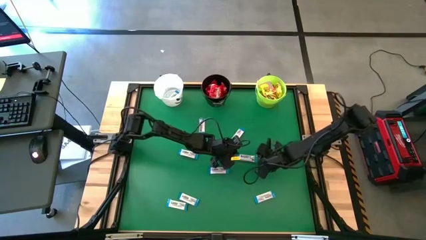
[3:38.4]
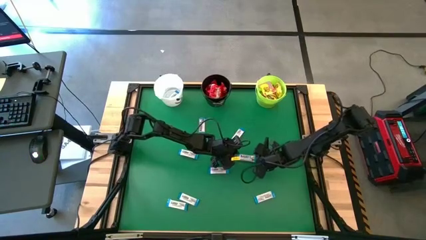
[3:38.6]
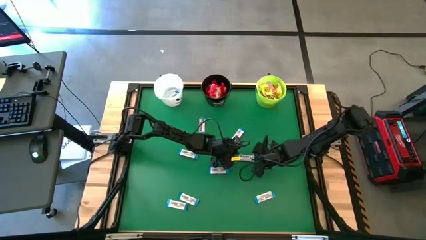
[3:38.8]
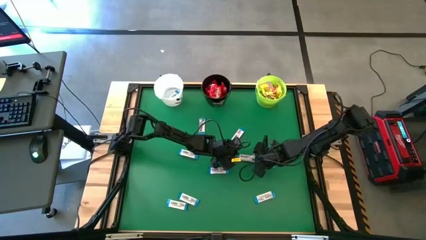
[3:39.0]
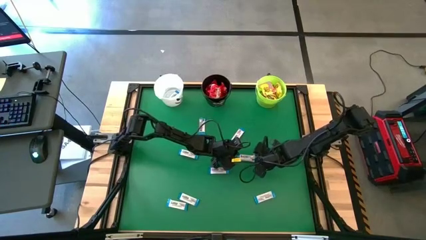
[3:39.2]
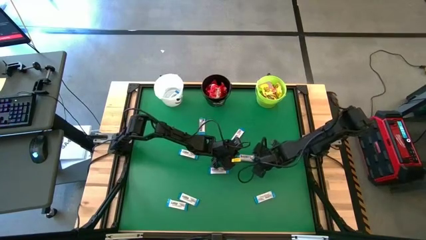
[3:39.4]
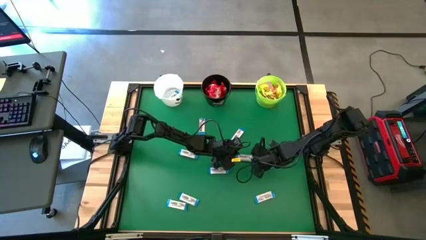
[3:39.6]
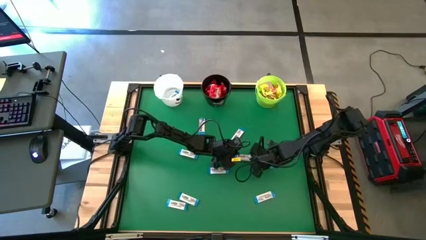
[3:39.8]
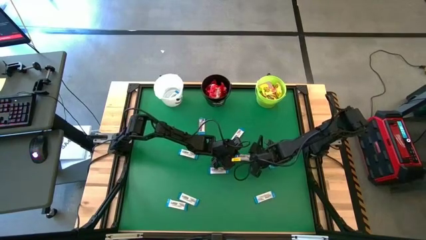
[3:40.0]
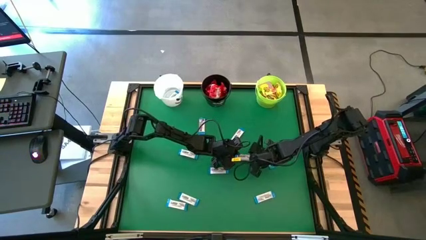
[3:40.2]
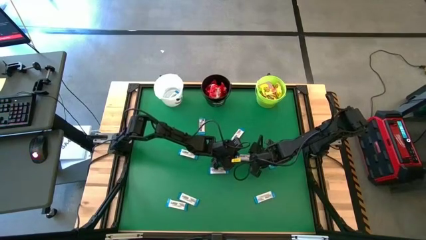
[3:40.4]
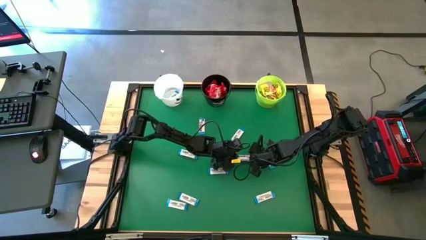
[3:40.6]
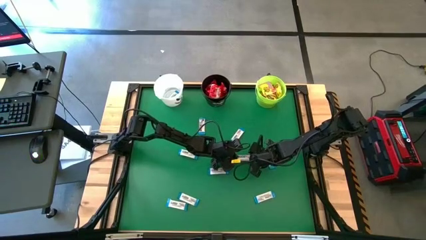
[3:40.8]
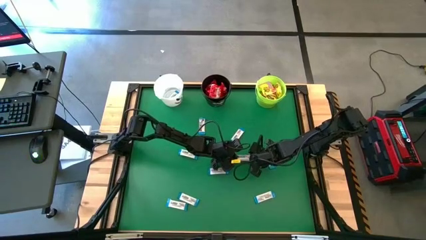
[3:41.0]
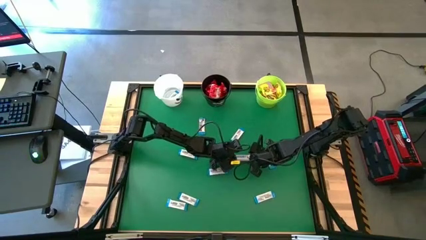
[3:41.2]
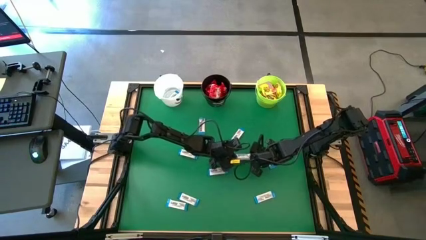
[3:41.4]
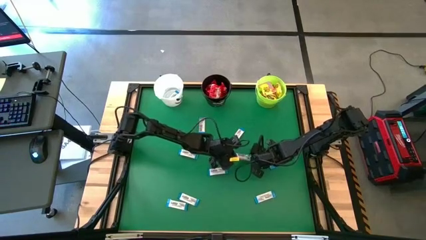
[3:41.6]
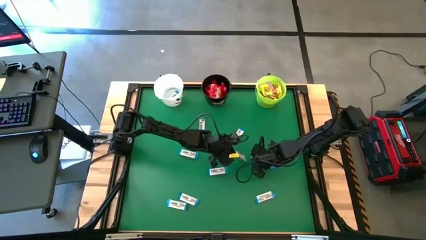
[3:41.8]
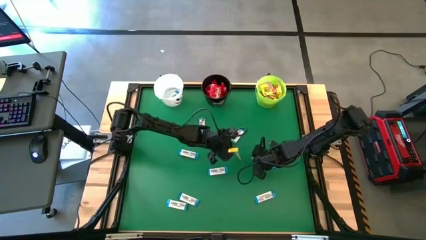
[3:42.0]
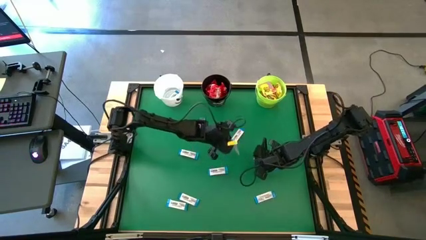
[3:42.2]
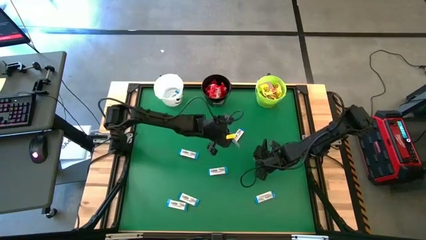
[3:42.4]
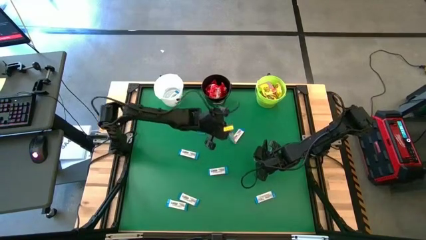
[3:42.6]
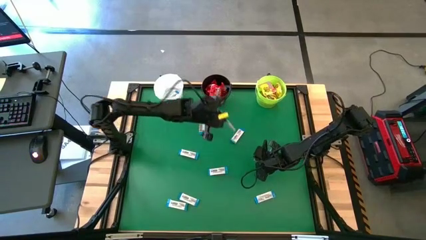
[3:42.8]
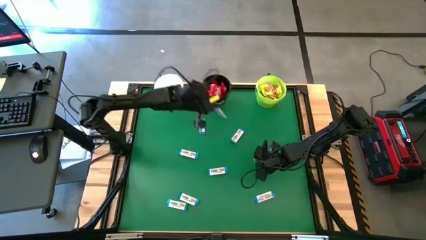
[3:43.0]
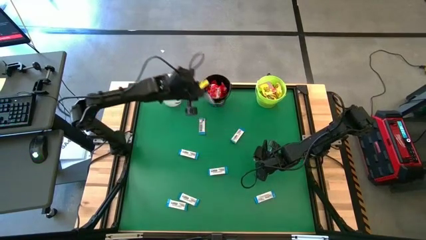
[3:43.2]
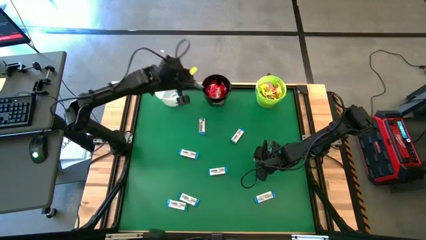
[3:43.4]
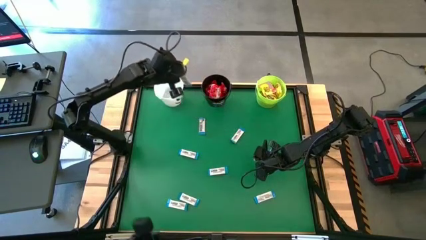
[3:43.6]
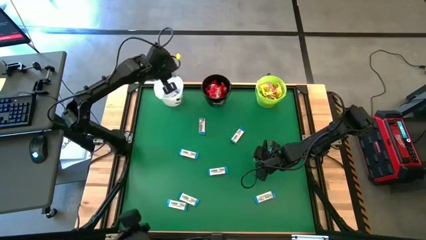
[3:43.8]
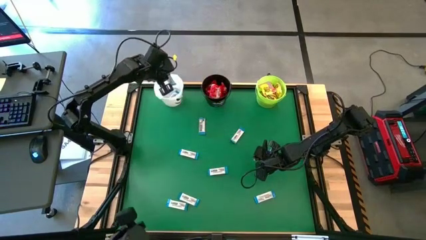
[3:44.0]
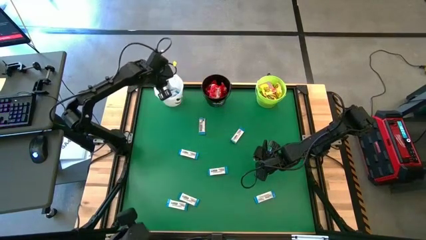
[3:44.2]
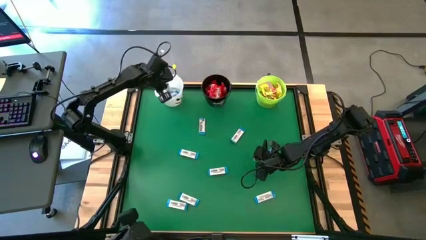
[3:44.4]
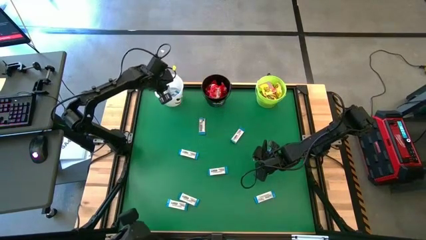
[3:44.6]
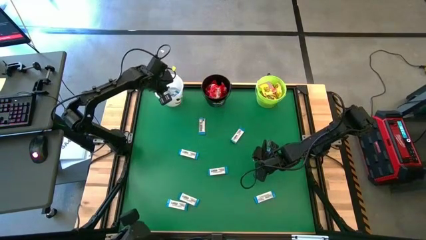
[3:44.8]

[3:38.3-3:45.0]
Task: Sort candy by brand, put in halloween buckets
Put the white chocolate bar into the white bucket

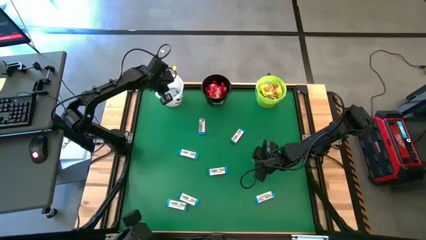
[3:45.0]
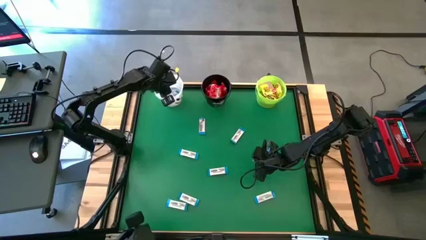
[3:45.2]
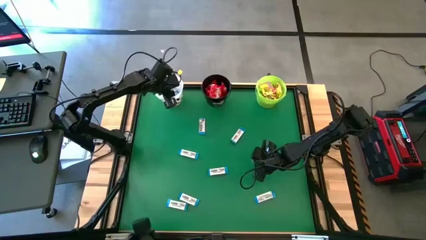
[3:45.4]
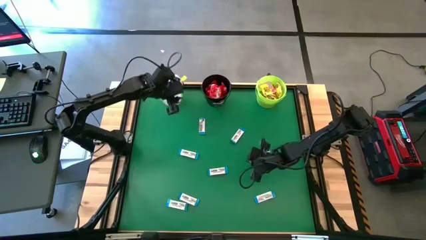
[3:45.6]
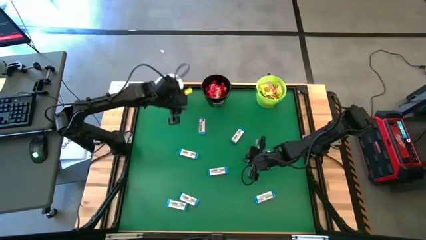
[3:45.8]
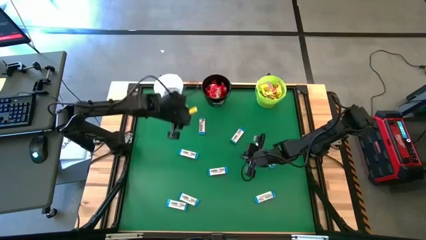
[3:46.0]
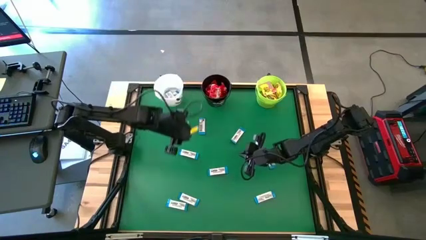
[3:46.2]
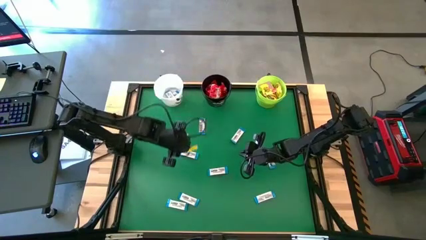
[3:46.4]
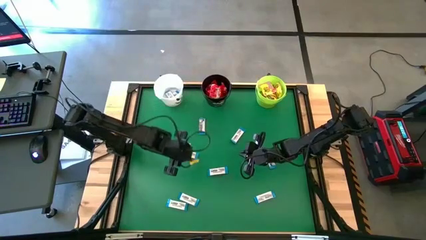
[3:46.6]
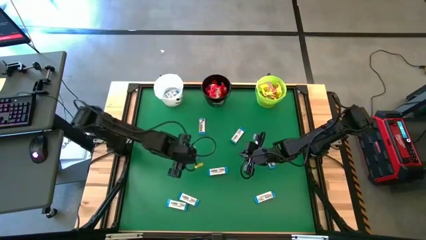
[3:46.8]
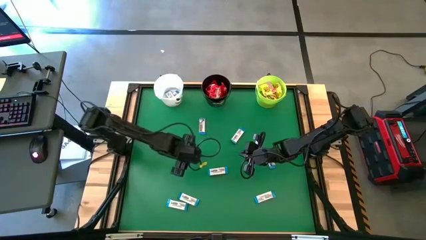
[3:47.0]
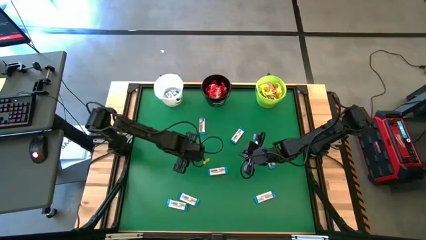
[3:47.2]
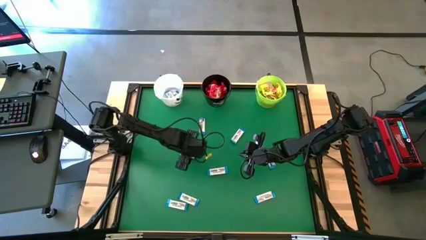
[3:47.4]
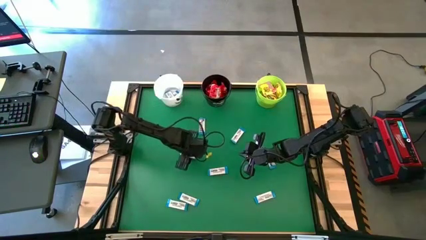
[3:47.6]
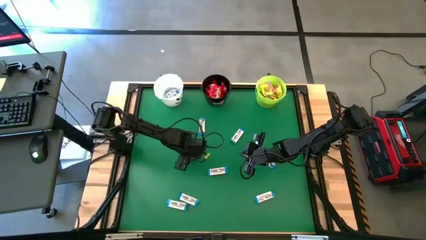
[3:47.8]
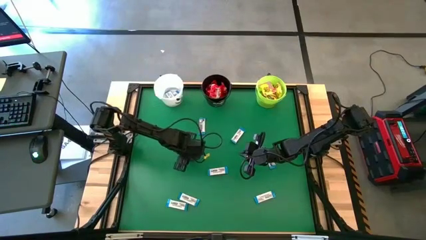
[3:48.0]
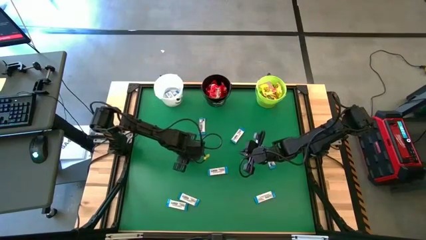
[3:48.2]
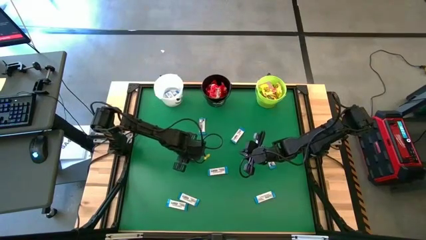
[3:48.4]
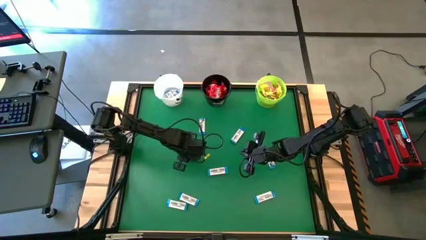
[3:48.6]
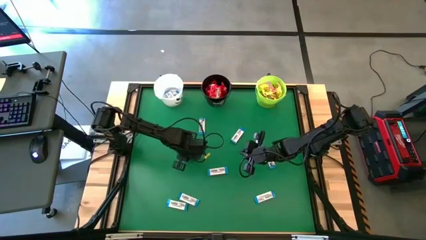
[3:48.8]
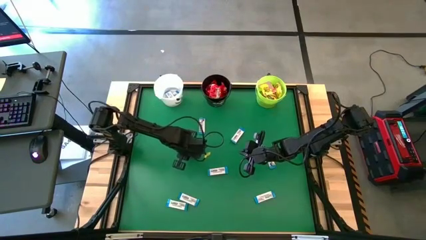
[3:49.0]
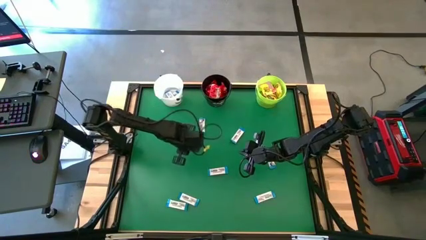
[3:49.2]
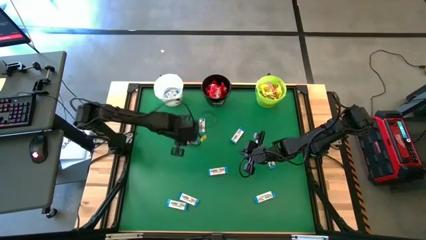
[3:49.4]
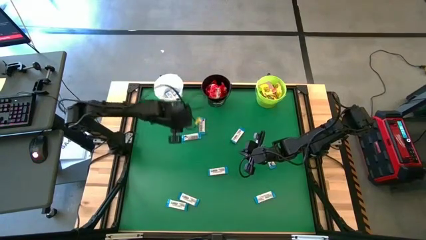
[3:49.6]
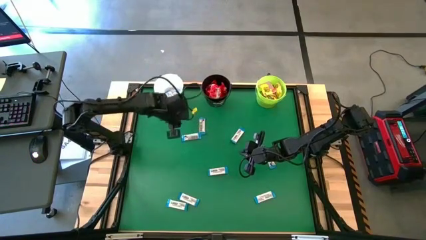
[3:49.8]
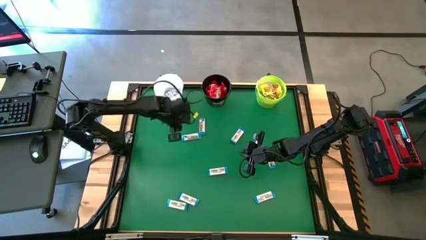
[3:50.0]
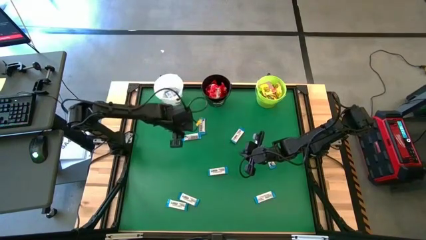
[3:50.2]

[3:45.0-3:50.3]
Put the white chocolate bar into the white bucket

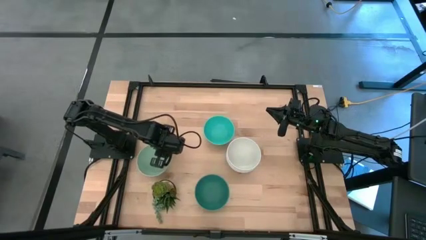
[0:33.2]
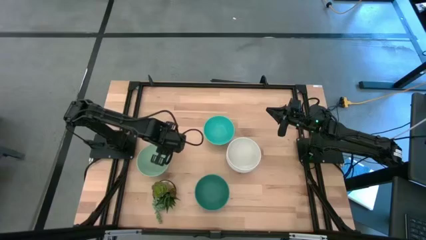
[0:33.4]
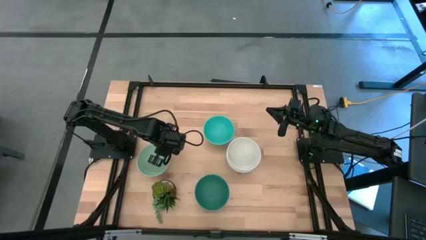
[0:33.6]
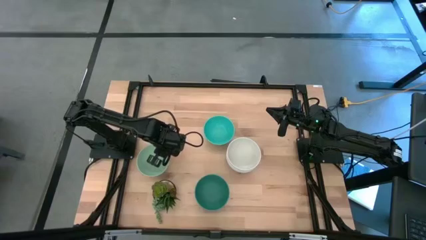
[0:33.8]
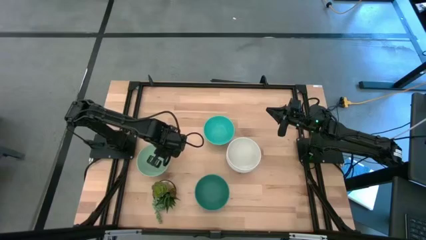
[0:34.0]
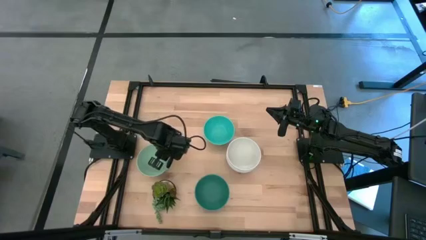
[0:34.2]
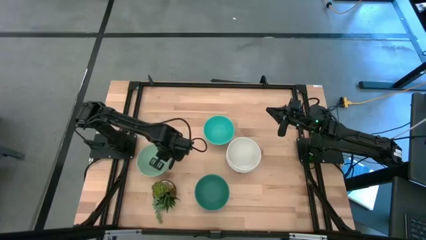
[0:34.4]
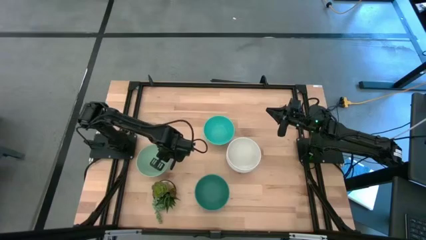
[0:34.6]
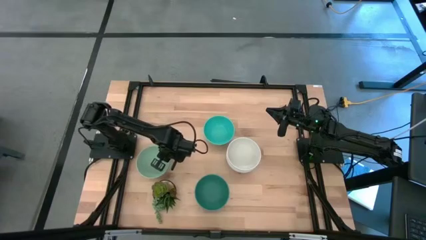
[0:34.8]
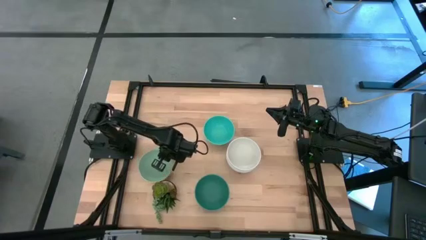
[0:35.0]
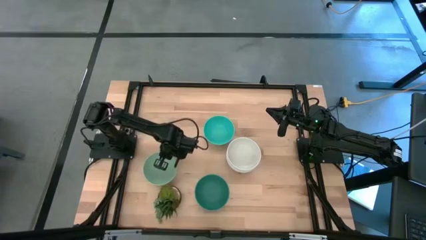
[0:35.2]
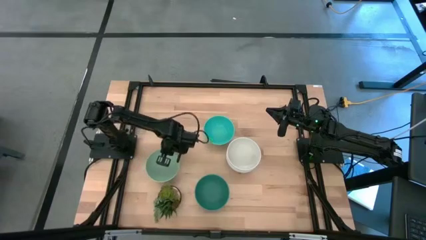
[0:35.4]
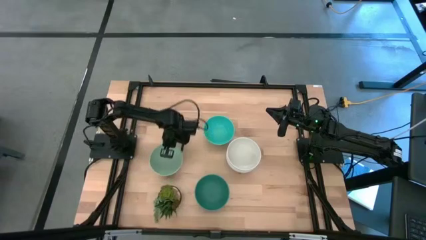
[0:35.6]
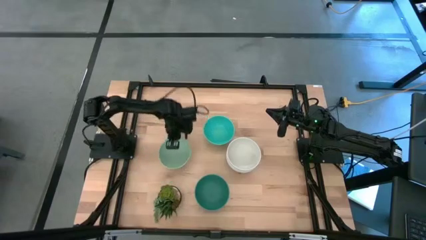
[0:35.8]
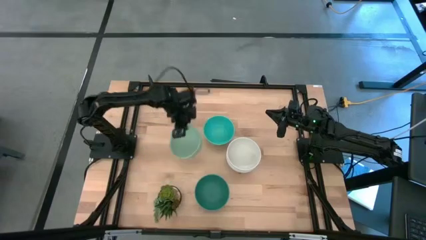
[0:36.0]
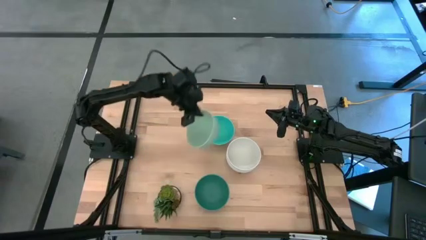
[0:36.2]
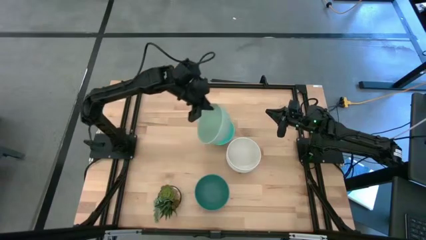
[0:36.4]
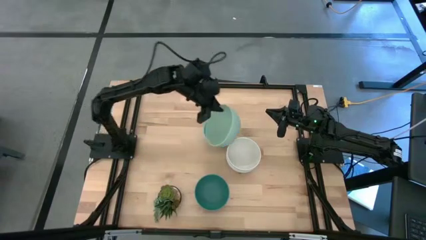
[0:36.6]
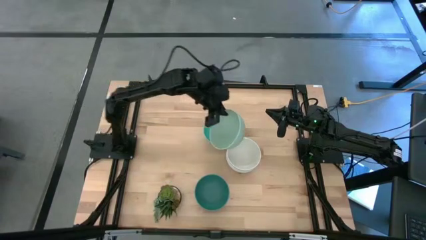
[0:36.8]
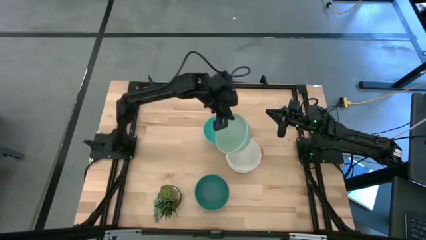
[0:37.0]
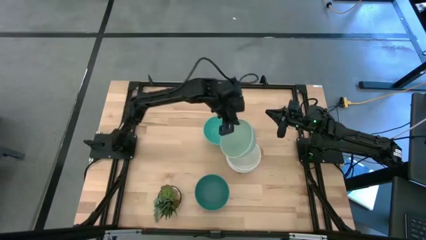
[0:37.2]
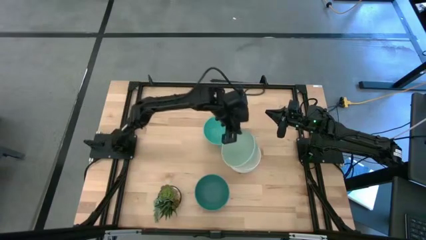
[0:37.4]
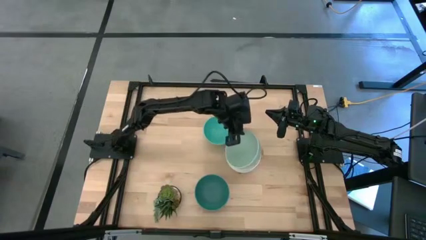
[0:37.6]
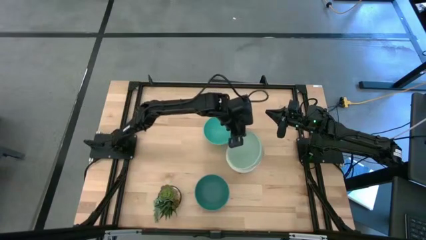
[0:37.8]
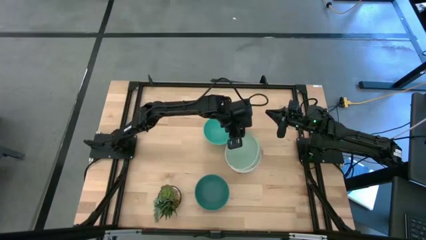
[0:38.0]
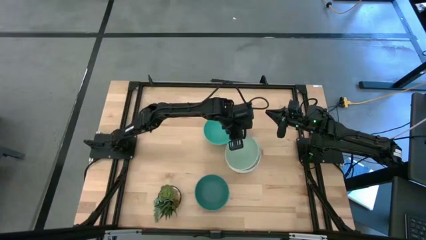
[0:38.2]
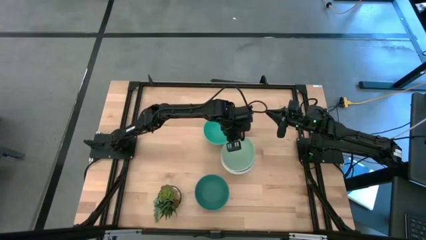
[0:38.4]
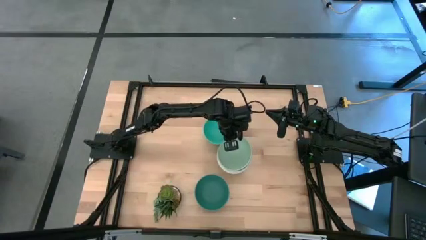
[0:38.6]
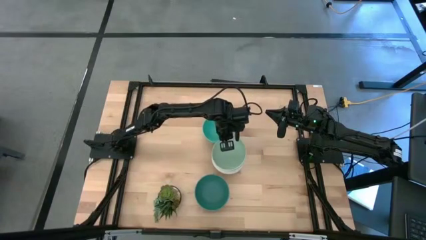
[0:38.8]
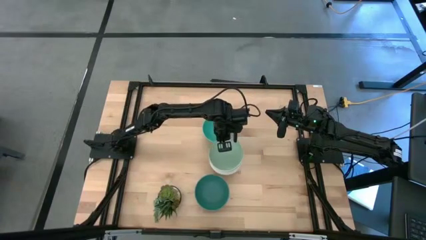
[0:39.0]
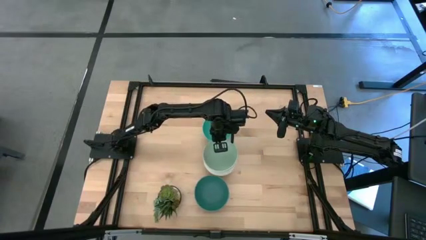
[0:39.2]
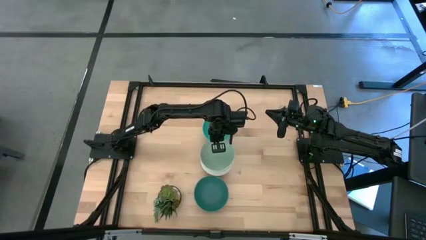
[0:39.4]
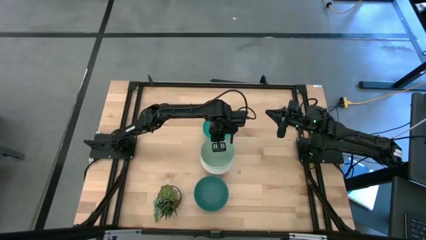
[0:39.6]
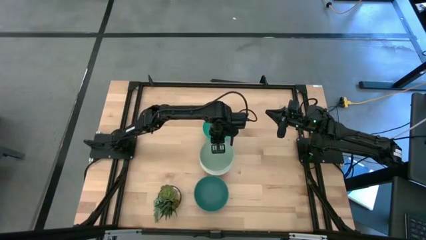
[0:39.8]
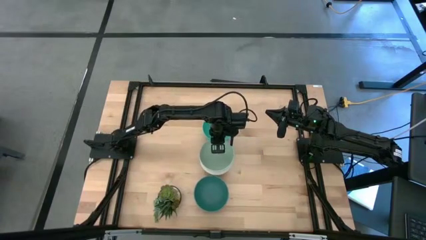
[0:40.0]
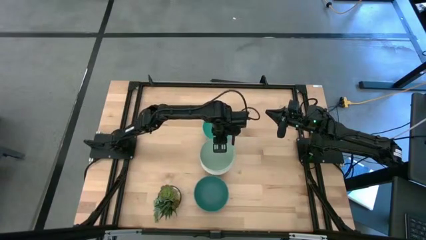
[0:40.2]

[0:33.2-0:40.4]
Task: Nest bowls inside each other
Stack the light green bowl on the white bowls
